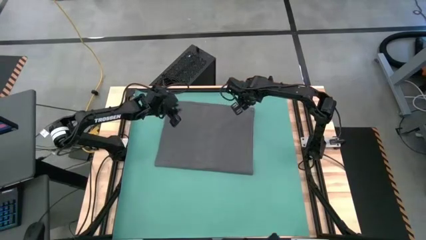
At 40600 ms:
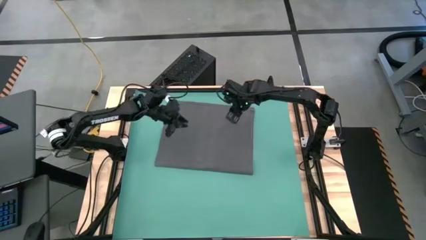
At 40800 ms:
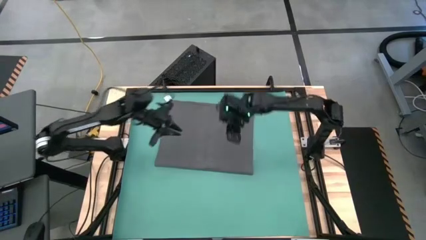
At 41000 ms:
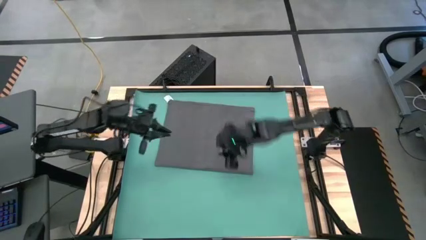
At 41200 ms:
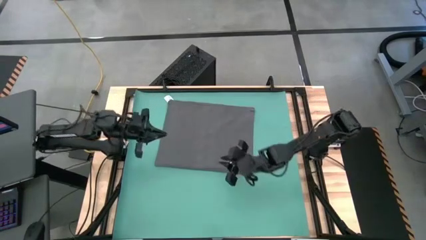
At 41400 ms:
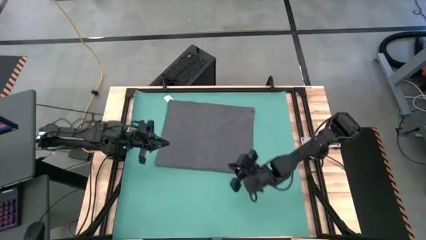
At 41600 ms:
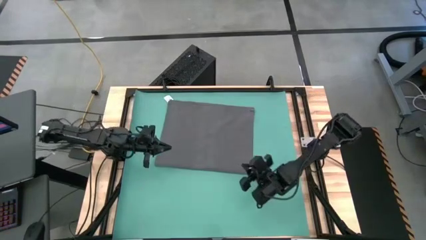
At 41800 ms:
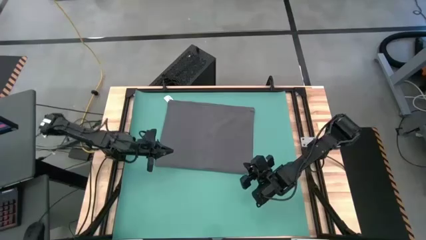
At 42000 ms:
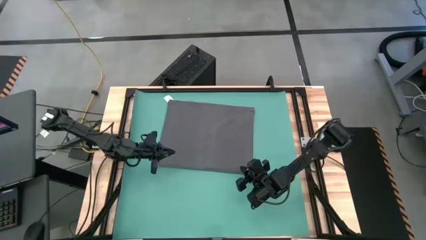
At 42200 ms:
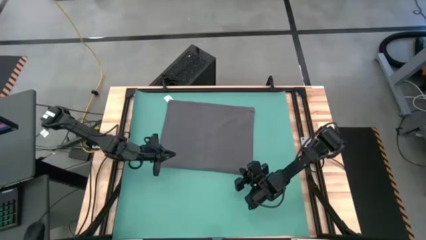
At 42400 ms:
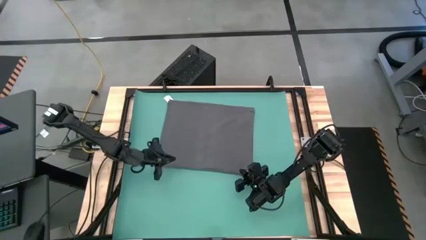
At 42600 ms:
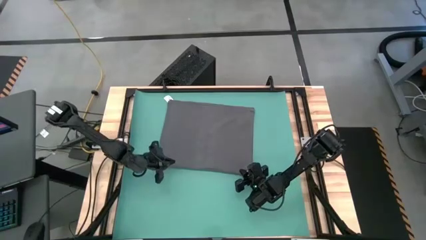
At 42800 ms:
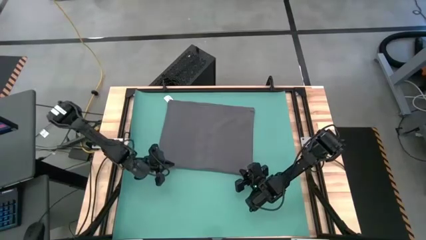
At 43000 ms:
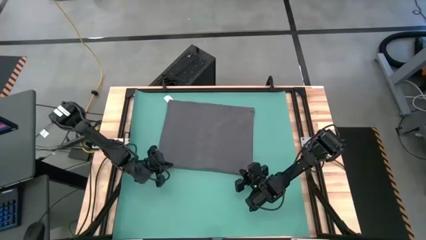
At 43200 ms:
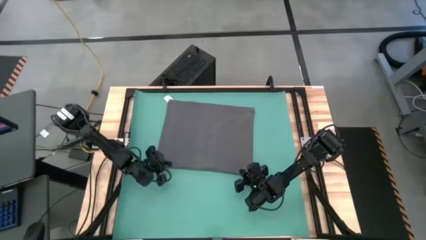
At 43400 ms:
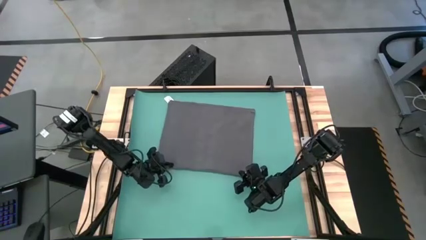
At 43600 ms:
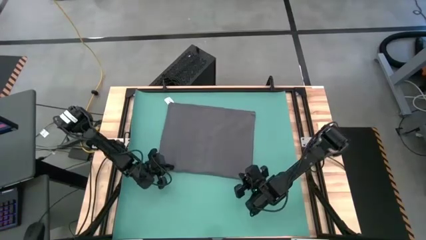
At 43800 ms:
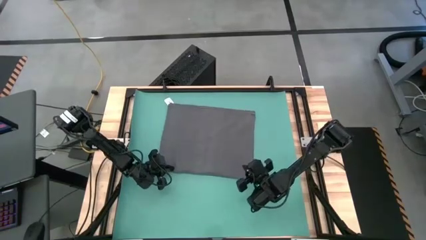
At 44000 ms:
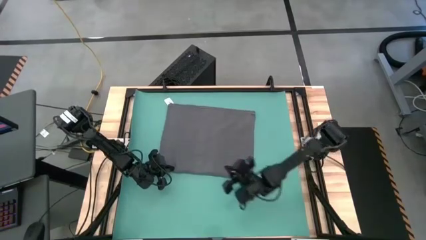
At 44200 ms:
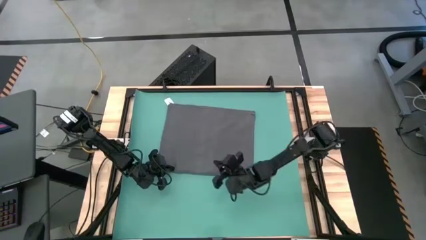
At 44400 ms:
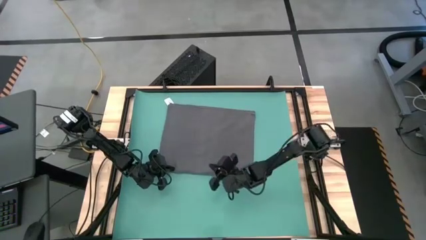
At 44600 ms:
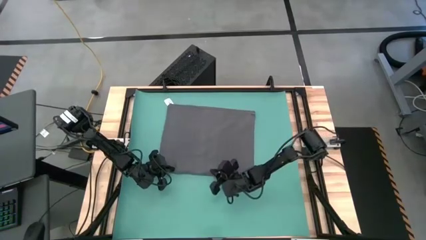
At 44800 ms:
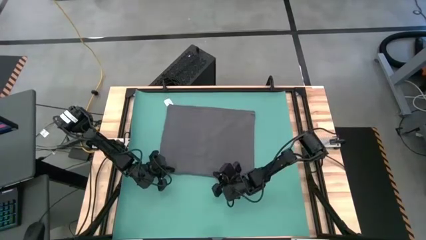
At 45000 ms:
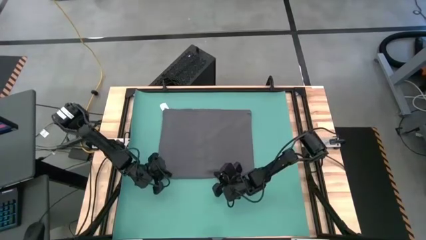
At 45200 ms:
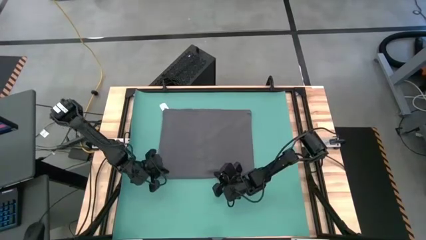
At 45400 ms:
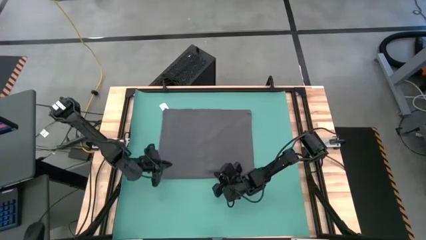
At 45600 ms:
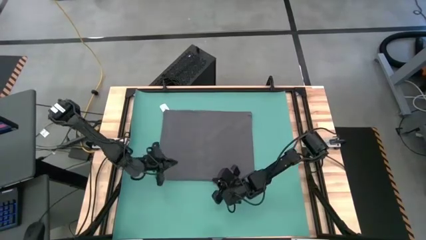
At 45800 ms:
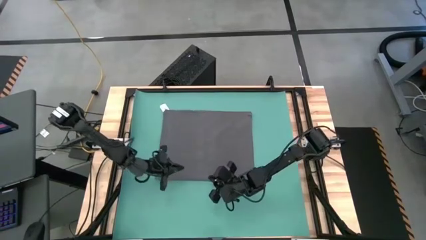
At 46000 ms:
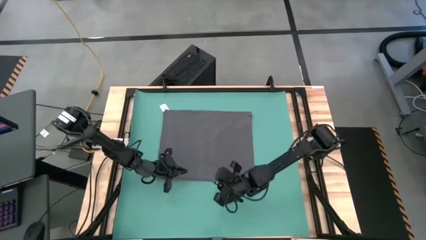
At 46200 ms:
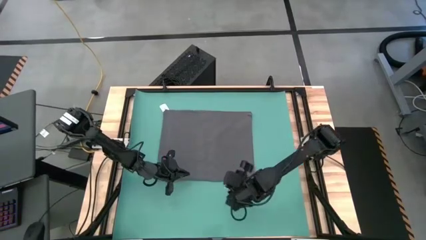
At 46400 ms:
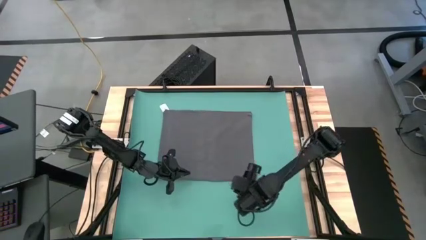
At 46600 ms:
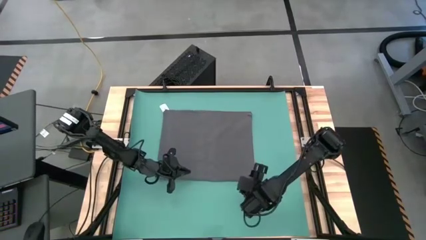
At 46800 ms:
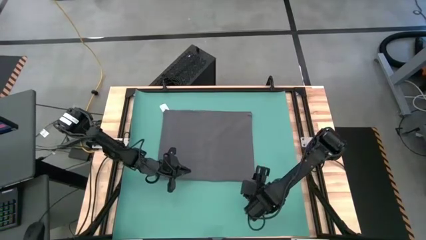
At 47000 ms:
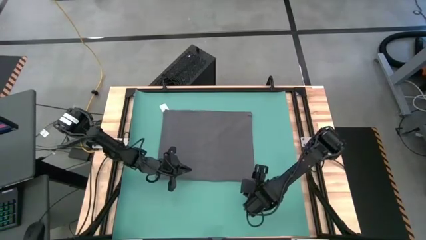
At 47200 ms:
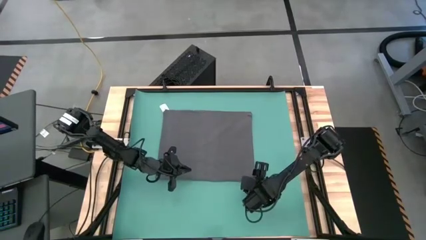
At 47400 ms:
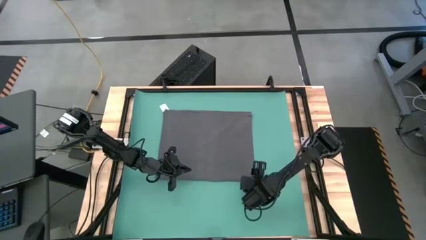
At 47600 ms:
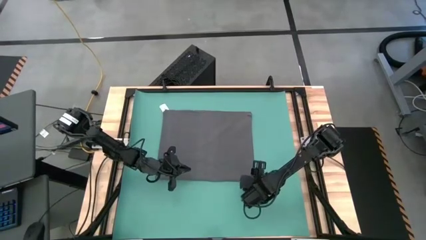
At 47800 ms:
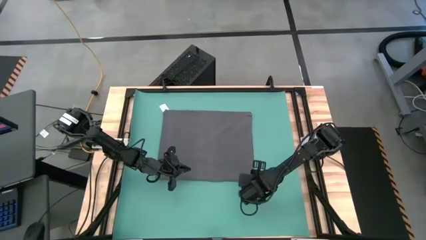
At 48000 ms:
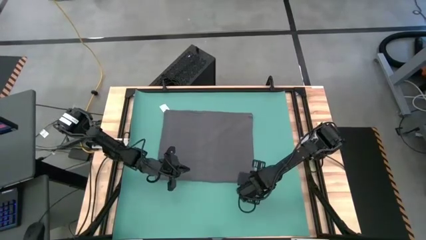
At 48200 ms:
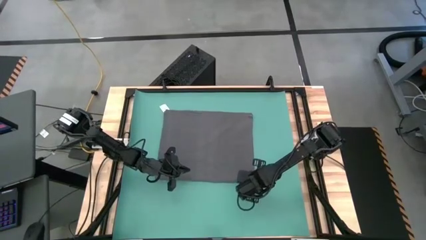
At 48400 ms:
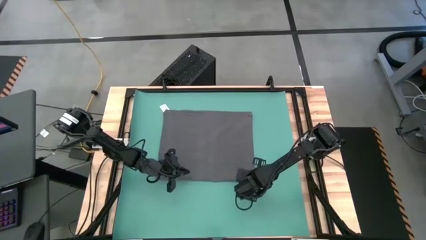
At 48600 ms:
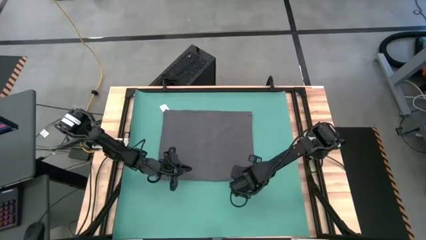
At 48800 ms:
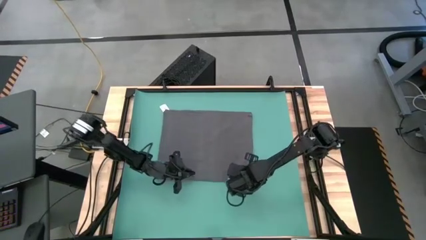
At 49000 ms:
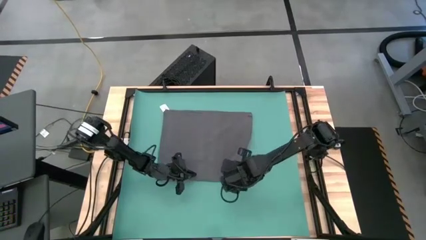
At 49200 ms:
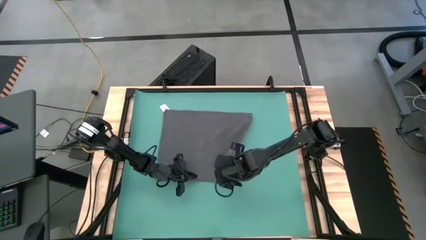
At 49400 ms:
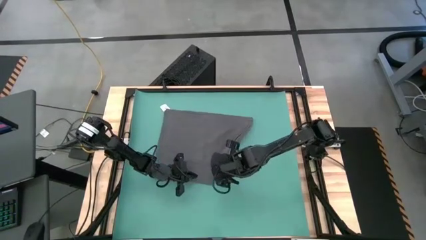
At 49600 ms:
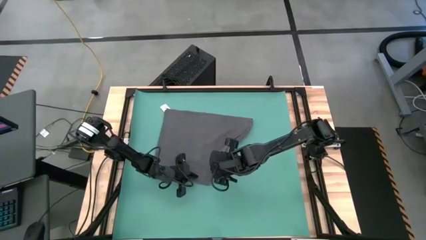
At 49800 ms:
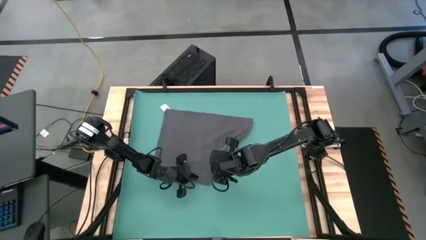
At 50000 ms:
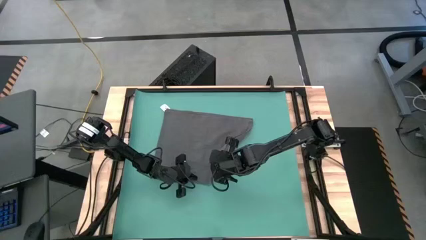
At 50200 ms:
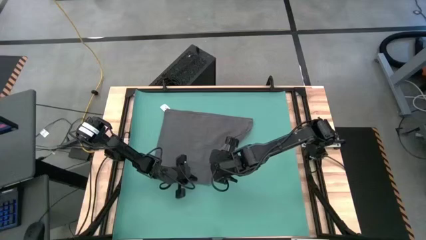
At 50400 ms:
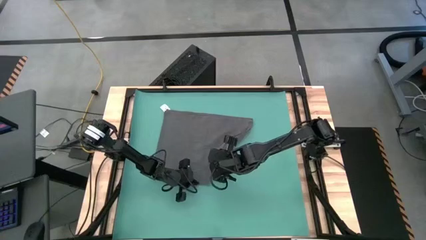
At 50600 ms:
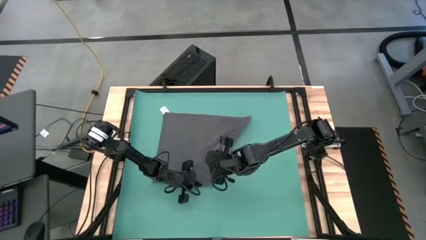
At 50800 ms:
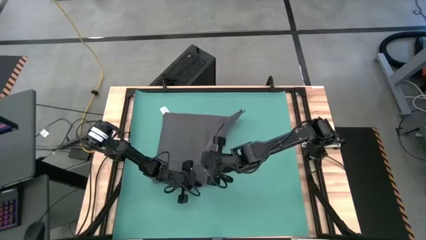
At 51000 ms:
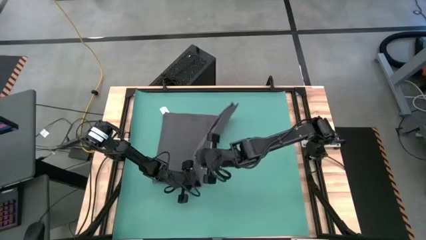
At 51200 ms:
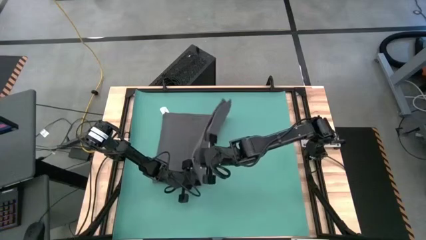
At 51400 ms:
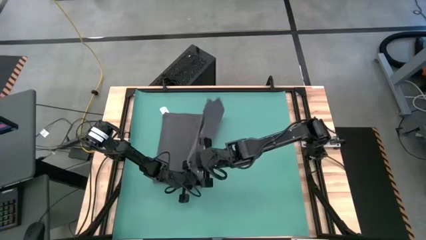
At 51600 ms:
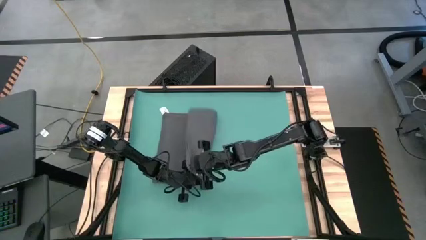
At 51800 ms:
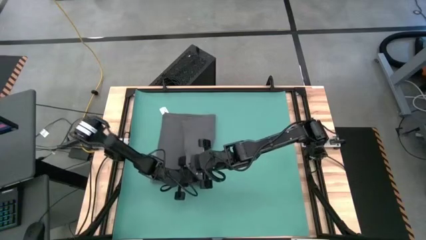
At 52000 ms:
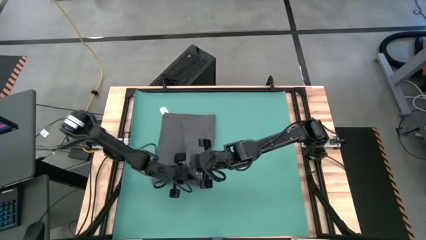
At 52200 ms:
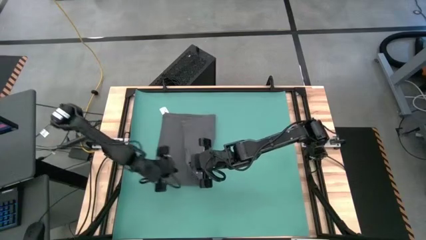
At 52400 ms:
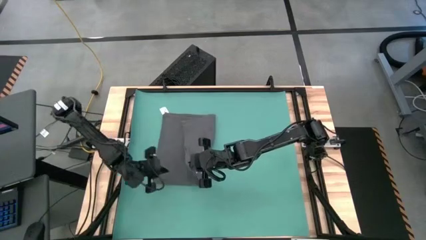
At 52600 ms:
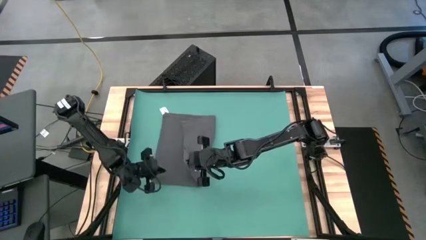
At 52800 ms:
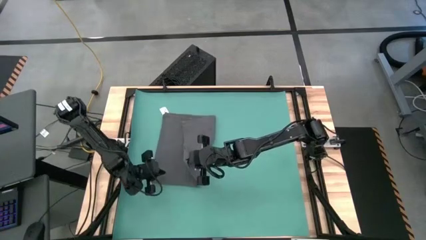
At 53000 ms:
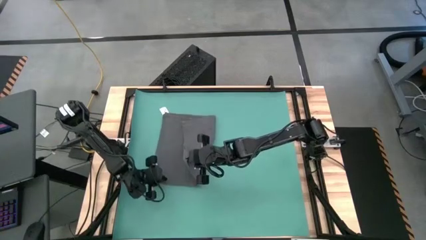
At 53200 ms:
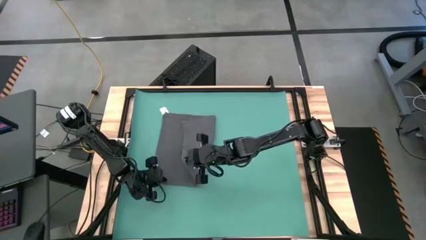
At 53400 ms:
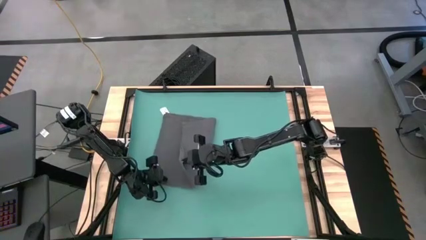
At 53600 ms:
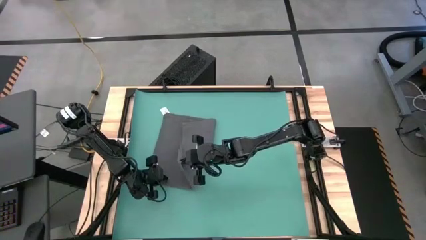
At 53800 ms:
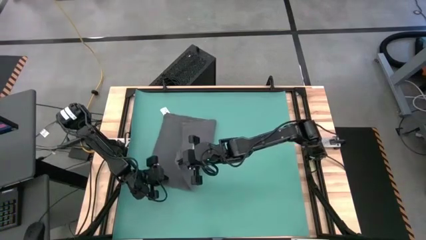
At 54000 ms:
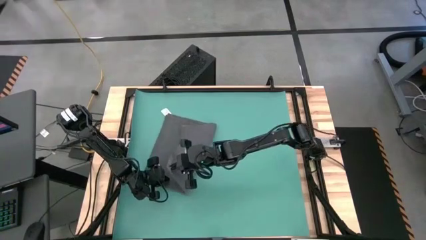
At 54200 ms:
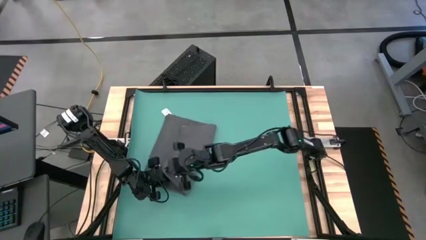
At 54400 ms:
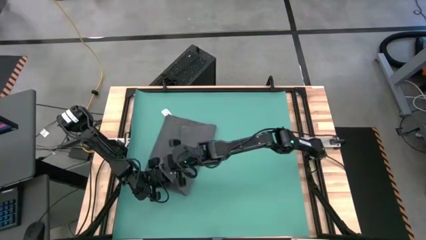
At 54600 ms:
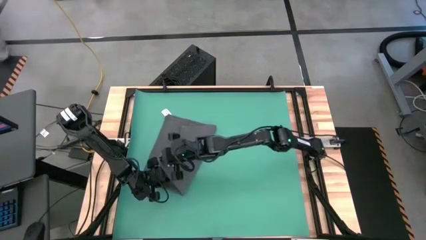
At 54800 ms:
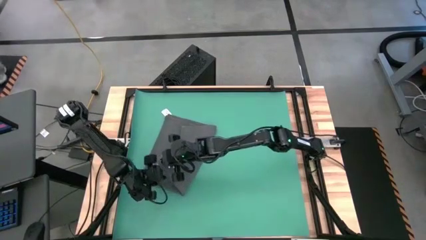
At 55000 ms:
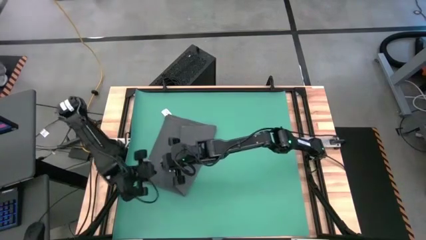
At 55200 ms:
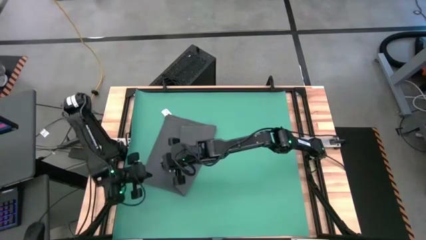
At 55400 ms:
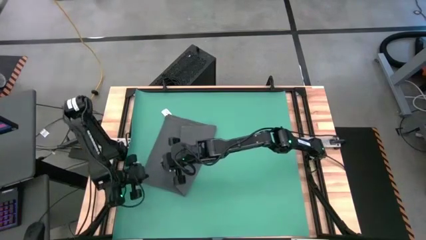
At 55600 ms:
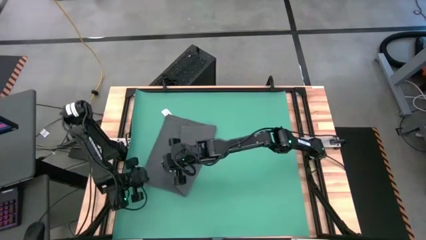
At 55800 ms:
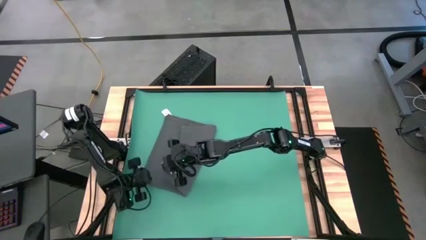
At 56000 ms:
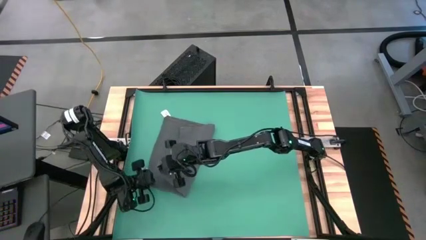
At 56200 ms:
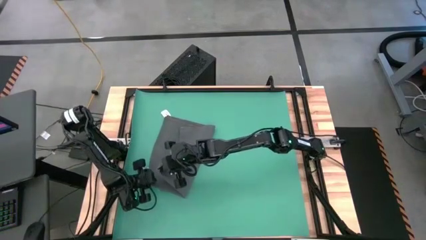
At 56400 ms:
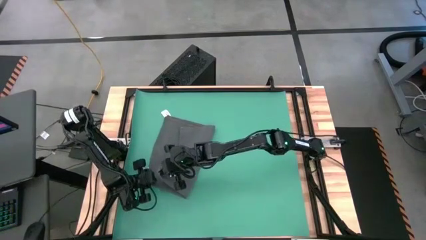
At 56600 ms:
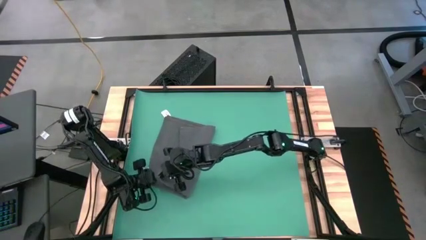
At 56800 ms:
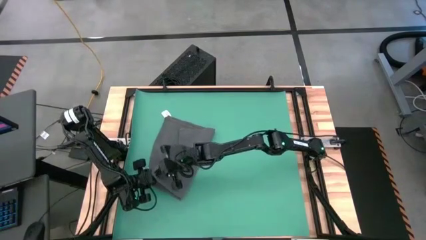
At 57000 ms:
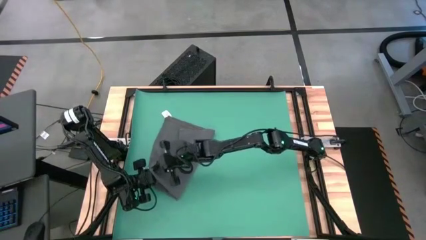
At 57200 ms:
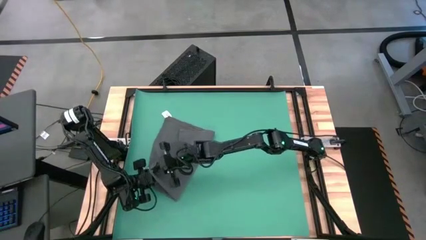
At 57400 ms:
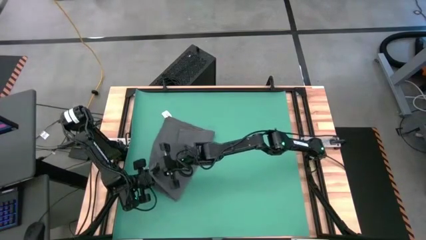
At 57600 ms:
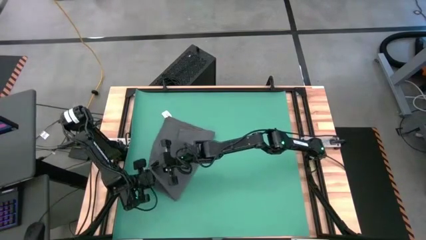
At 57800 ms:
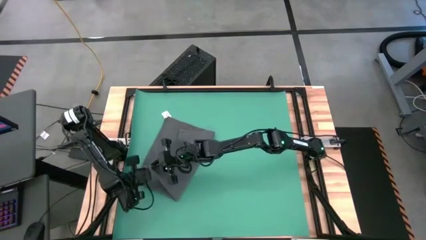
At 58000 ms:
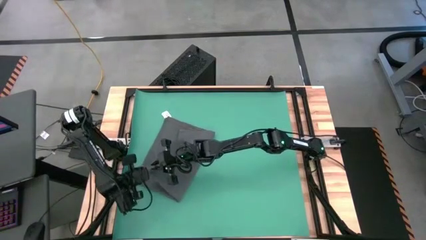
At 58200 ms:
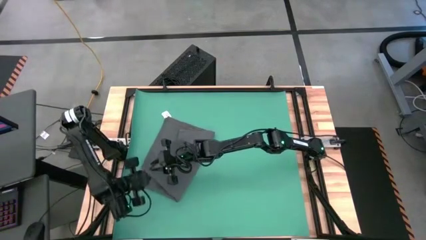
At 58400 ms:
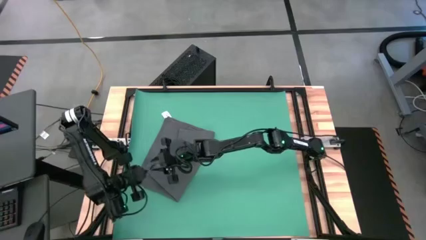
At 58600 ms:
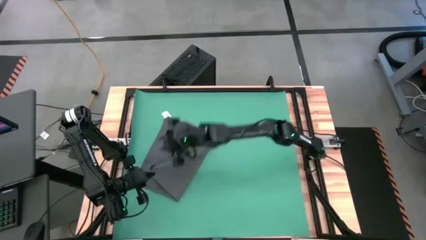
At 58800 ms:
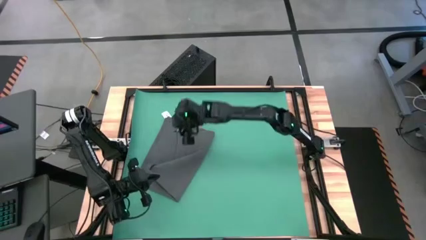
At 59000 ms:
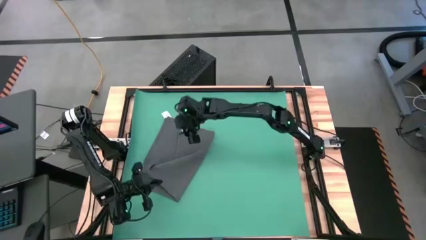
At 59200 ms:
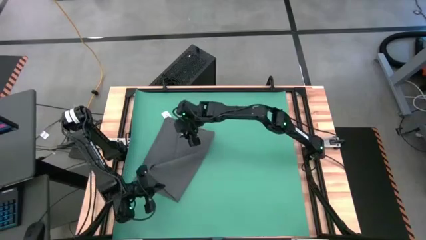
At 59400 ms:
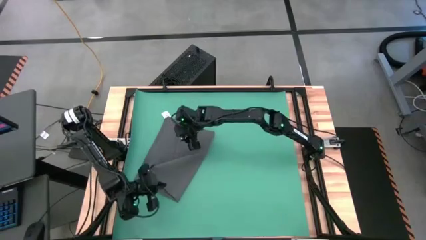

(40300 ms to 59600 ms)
Task: Roll towel
Fold the gray towel
